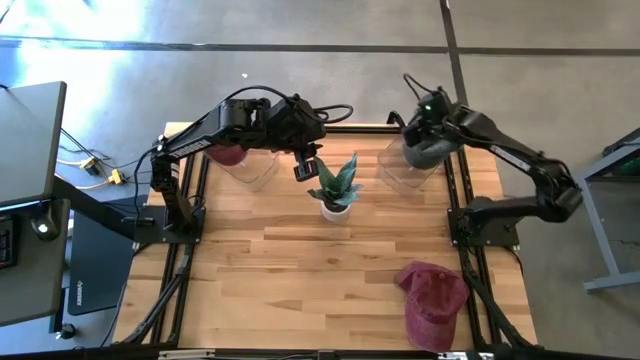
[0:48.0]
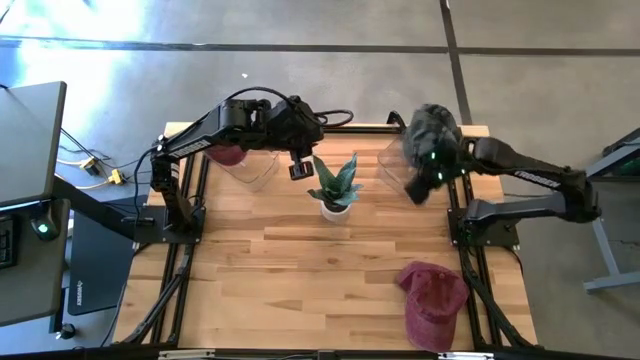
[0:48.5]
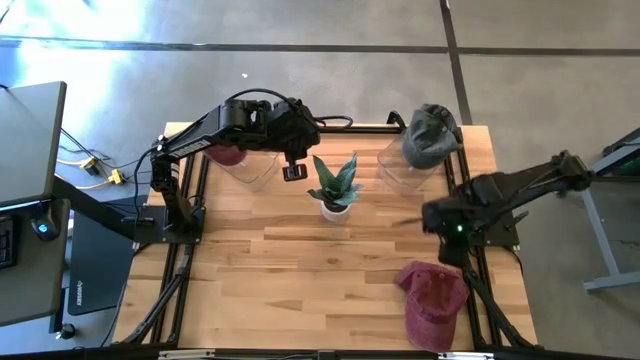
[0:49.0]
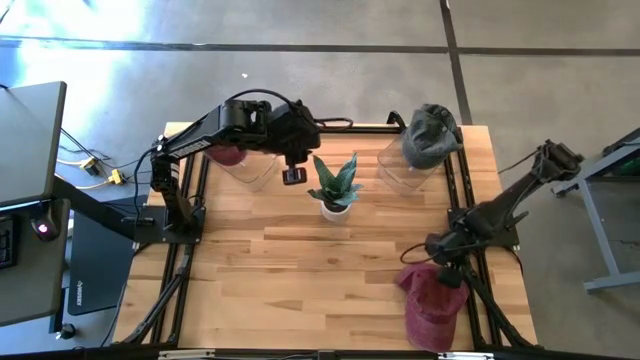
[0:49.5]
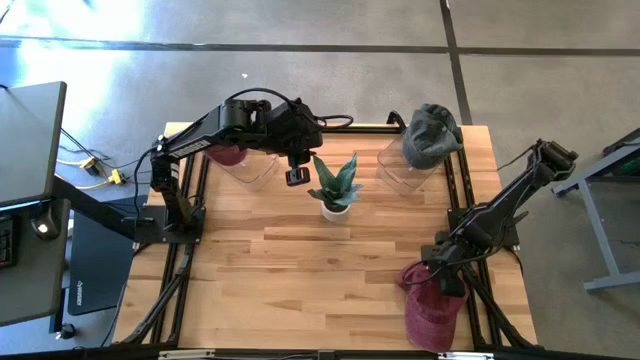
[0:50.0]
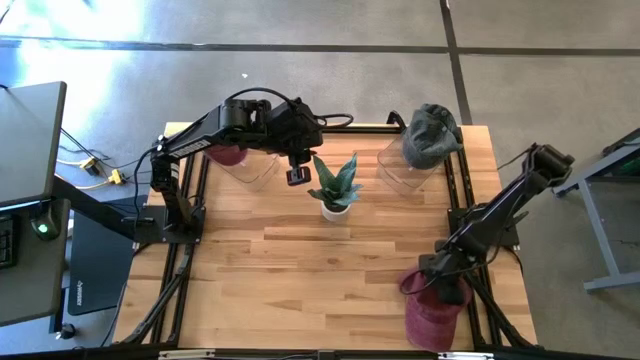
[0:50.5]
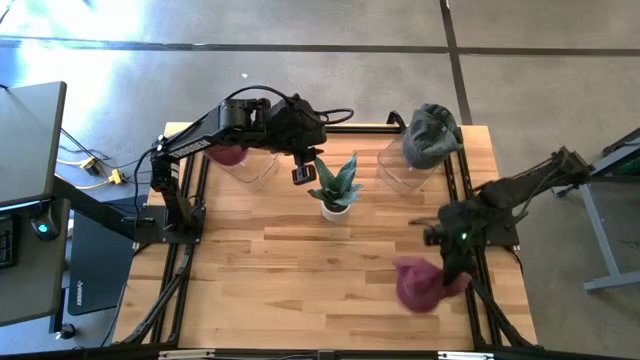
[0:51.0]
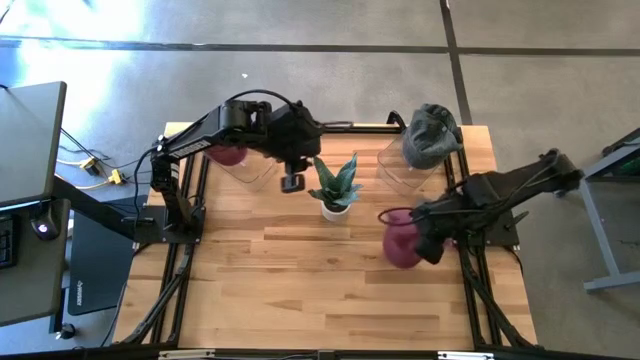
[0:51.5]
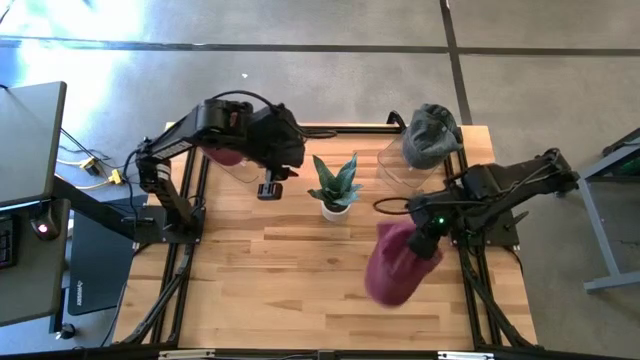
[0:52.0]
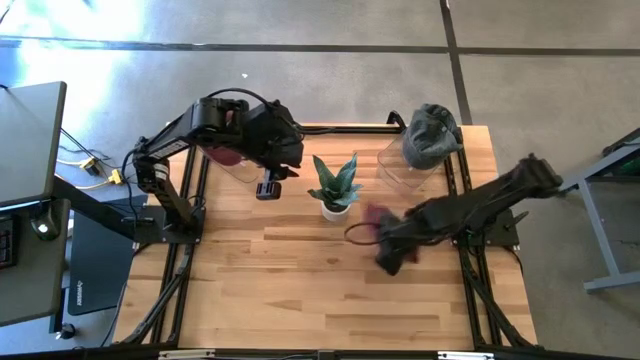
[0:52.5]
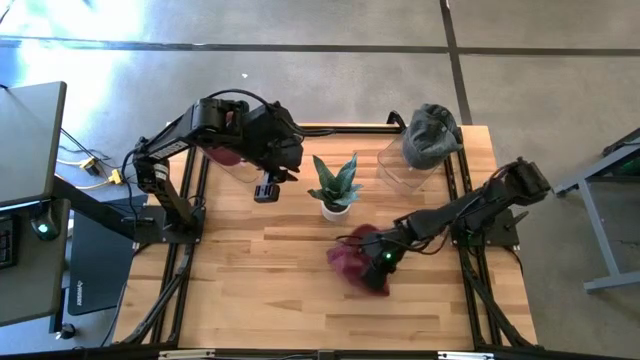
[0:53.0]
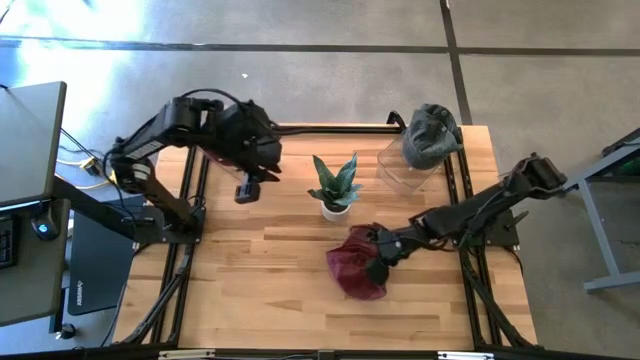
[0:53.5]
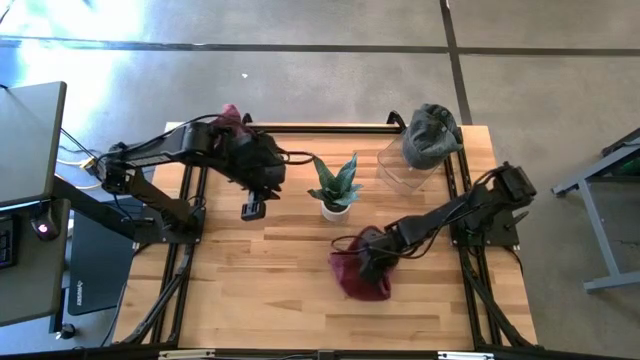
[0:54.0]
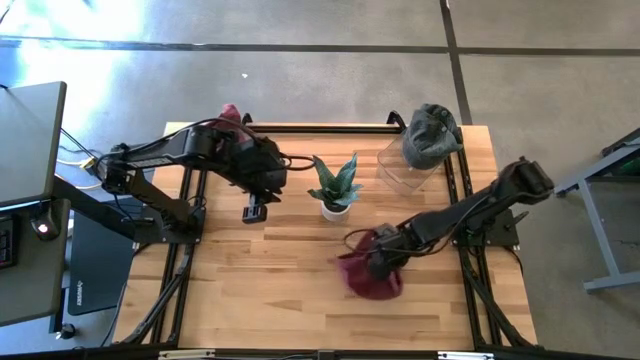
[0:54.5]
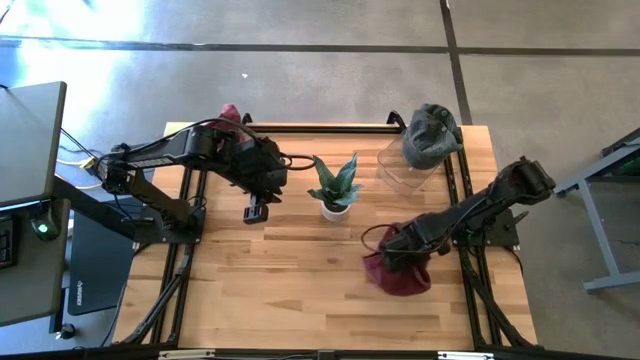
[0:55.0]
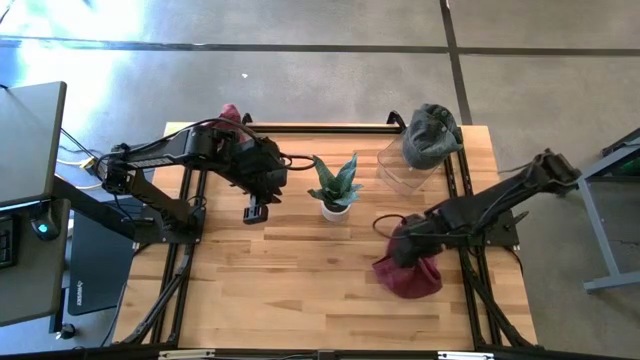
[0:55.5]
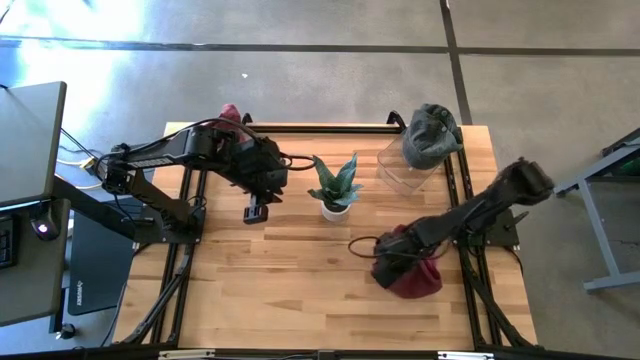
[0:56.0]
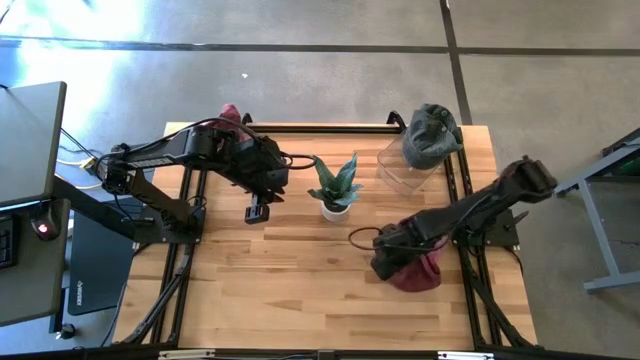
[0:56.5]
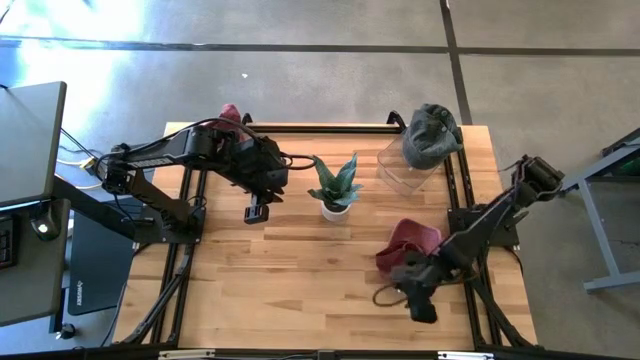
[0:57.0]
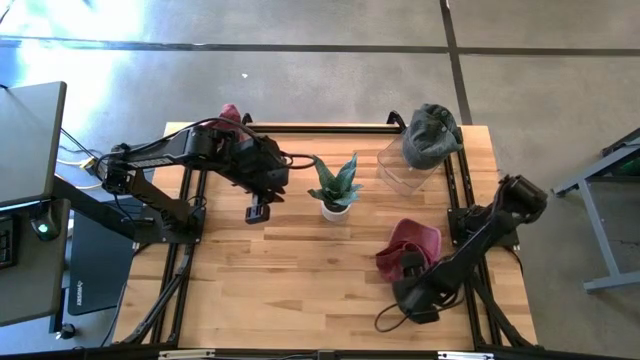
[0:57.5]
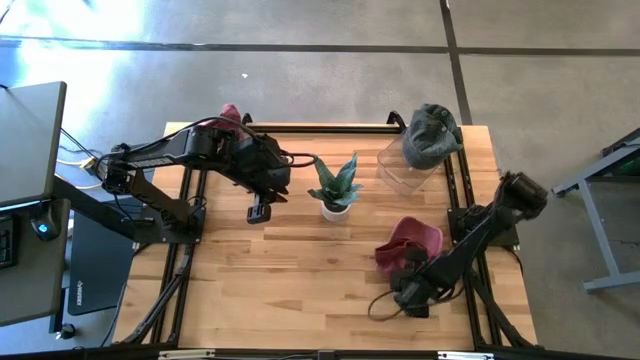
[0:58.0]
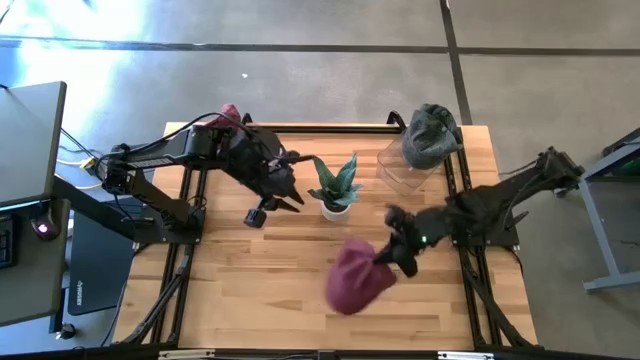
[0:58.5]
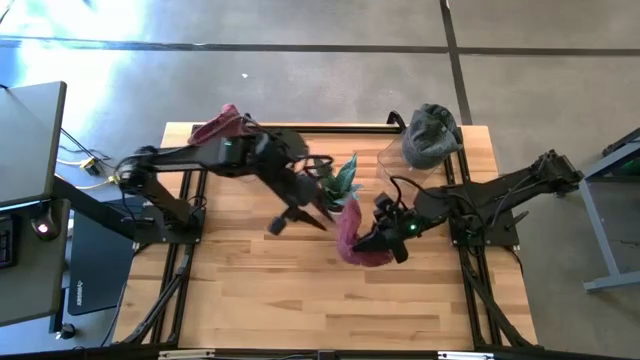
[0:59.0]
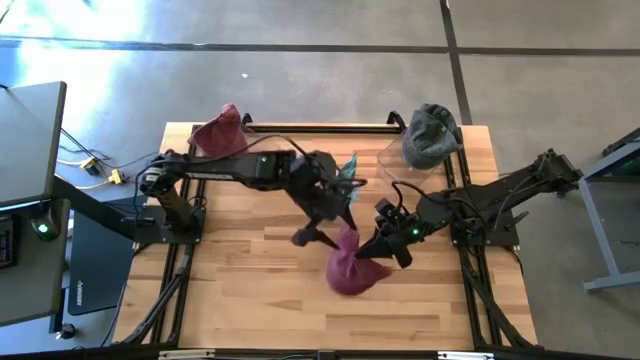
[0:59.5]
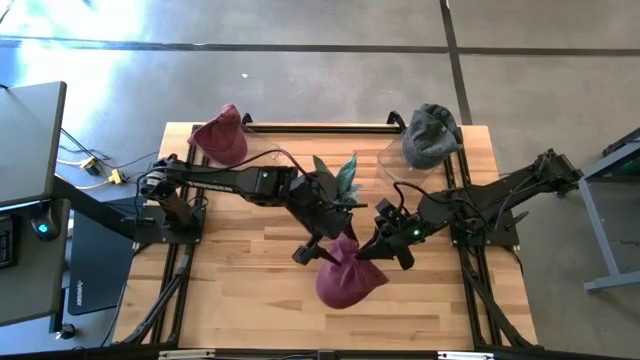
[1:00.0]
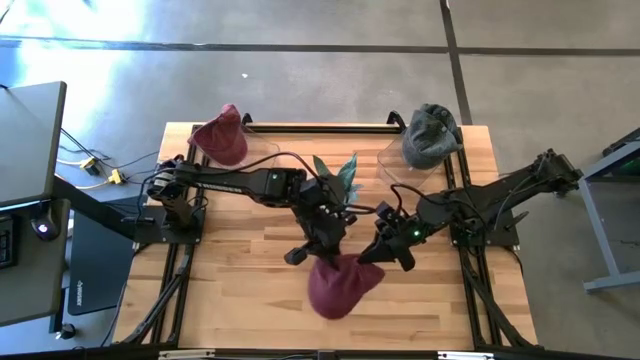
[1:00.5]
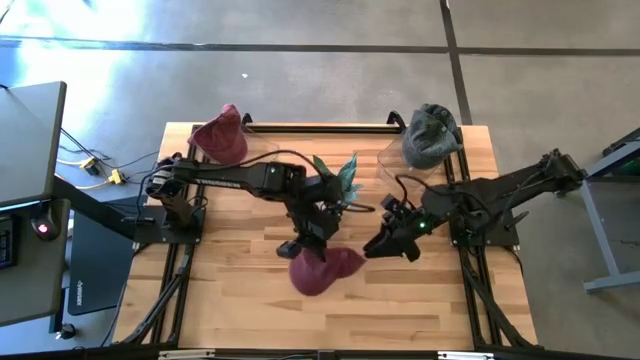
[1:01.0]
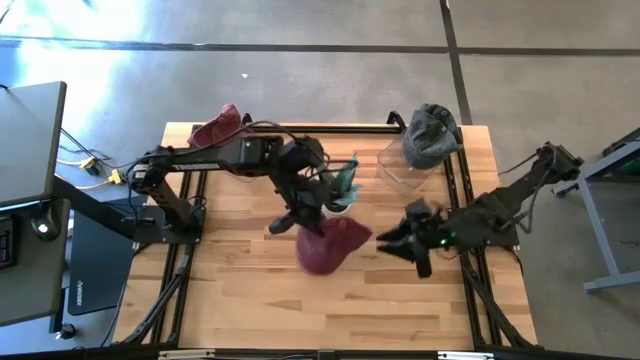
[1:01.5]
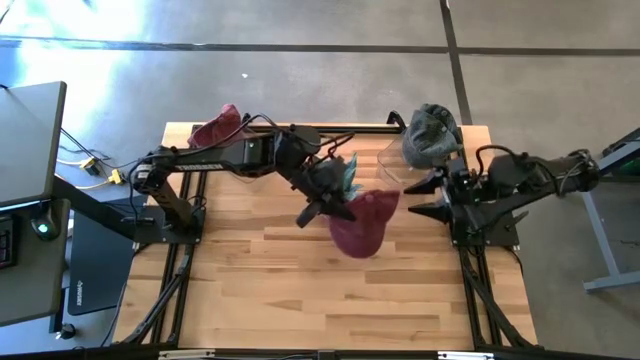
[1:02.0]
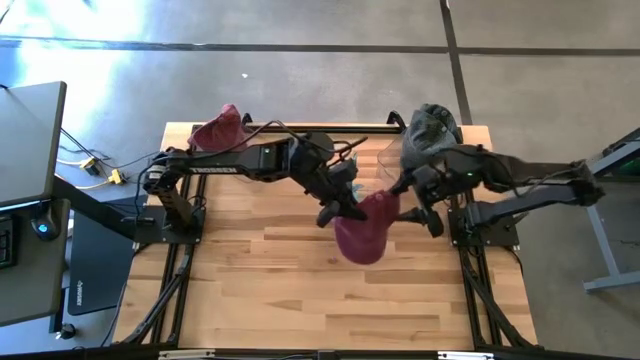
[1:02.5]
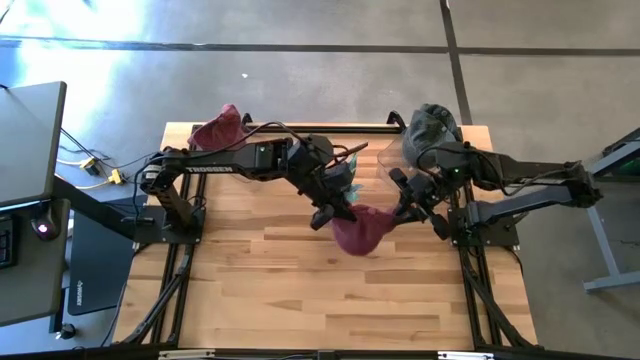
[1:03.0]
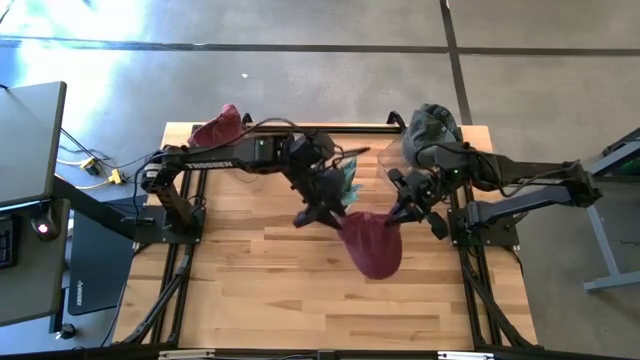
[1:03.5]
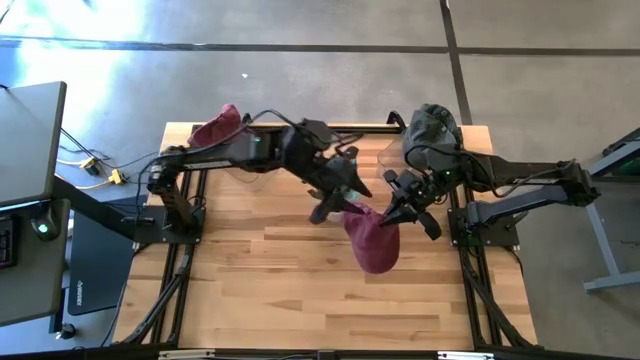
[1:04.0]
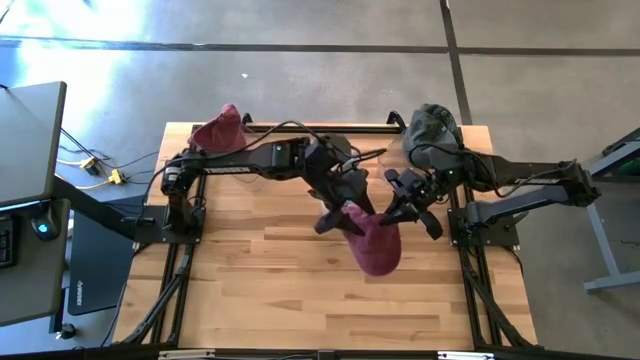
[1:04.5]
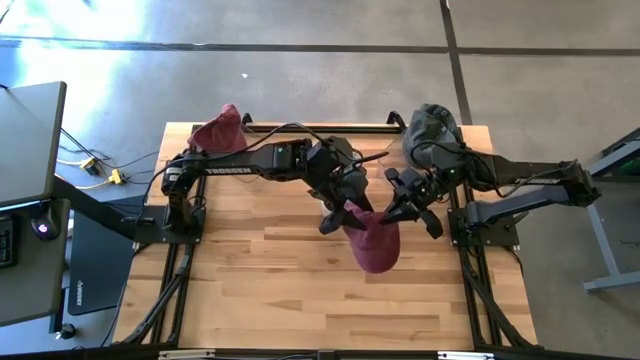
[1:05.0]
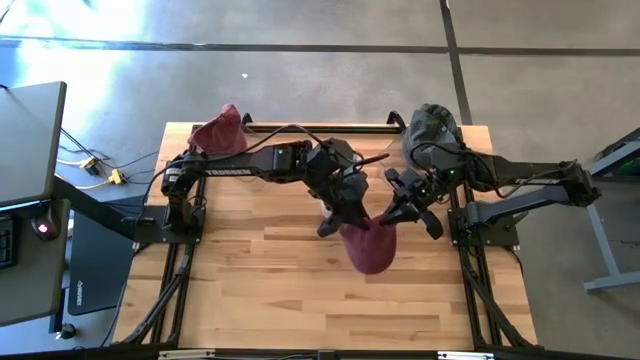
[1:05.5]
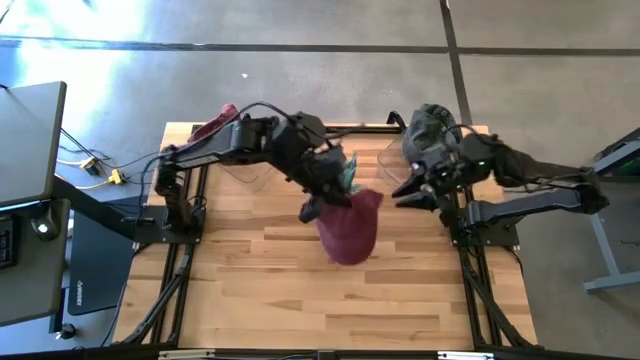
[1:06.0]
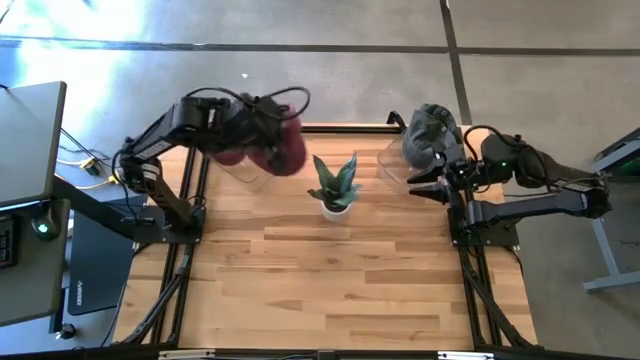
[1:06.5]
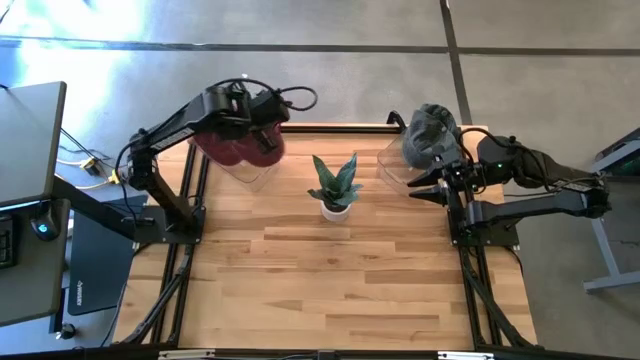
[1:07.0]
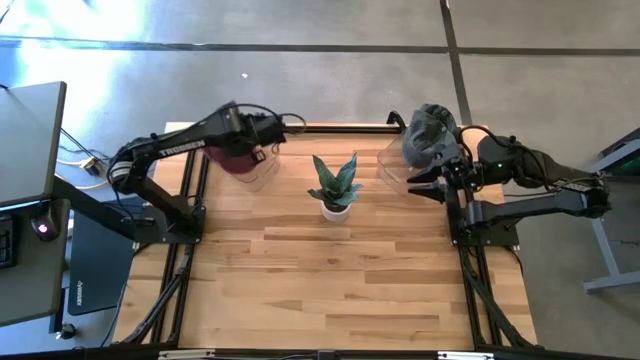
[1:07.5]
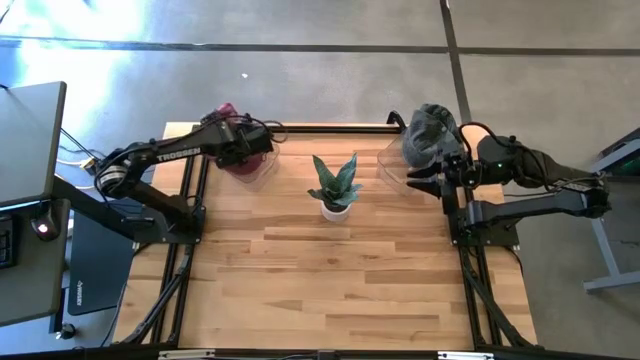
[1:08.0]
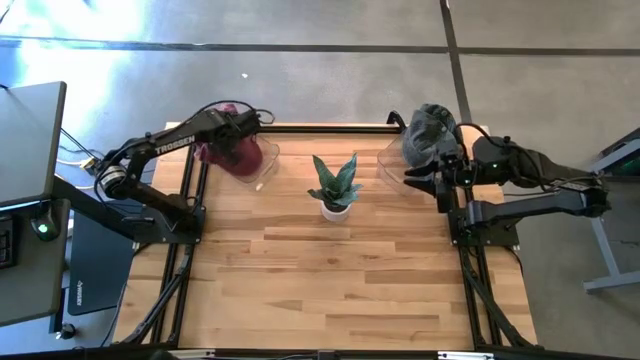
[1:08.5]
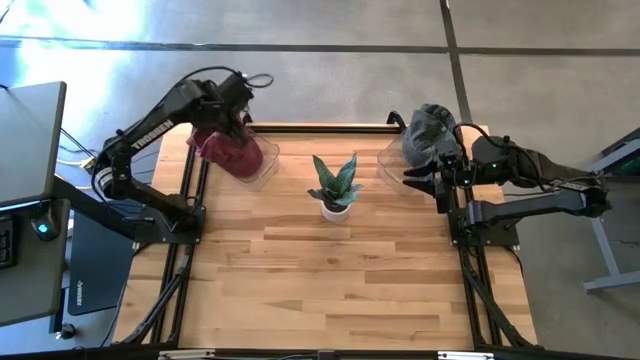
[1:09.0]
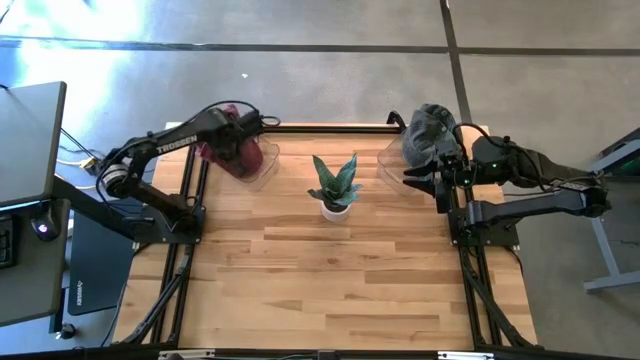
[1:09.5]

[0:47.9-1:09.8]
Task: Pick & Place hat
Put the red cap into the left transparent bin
